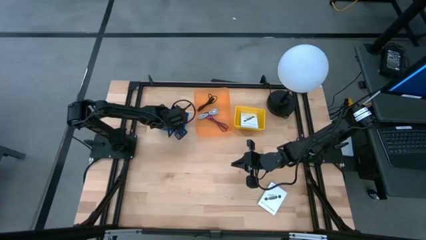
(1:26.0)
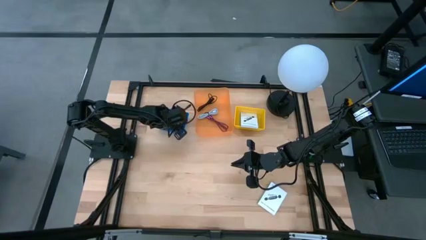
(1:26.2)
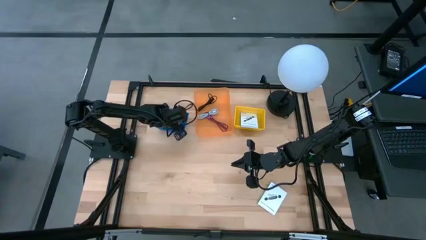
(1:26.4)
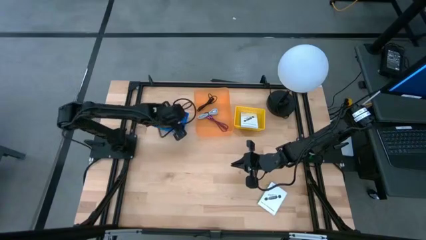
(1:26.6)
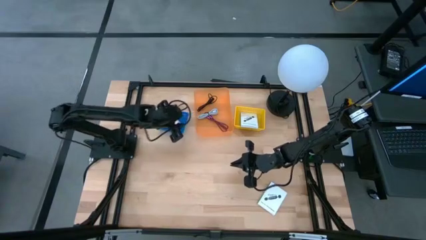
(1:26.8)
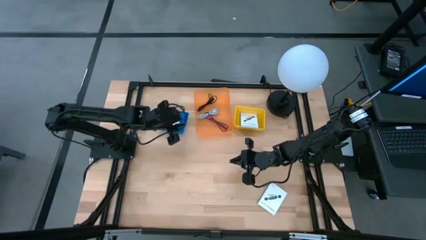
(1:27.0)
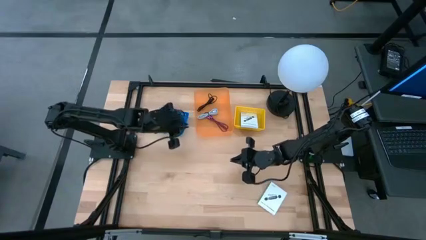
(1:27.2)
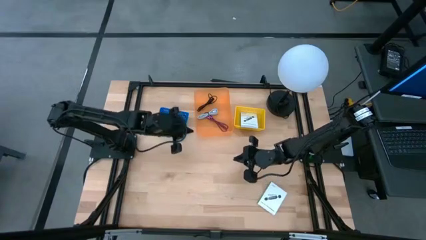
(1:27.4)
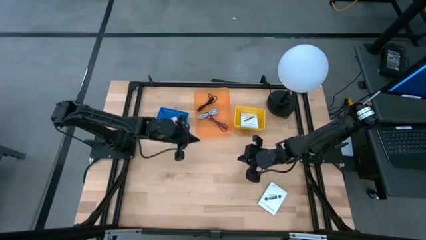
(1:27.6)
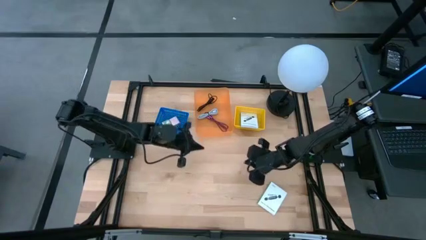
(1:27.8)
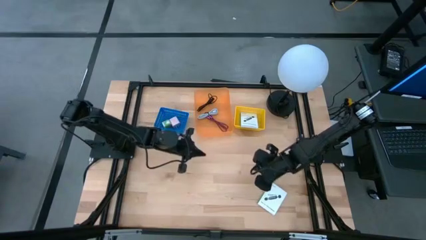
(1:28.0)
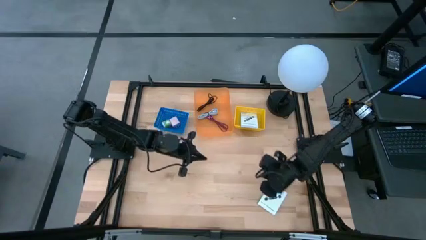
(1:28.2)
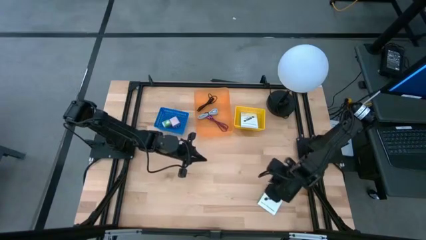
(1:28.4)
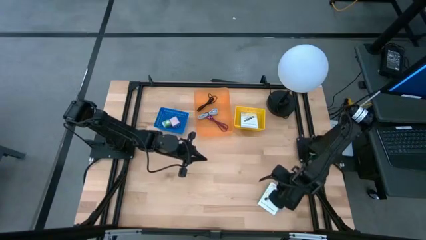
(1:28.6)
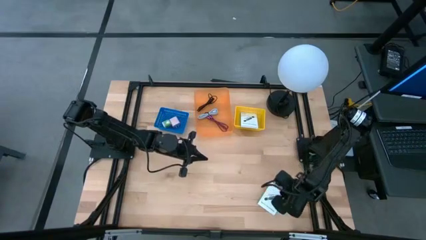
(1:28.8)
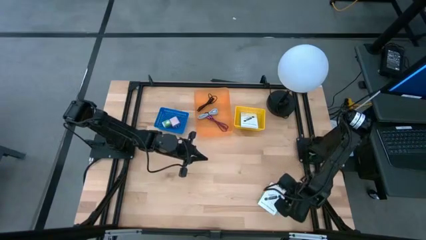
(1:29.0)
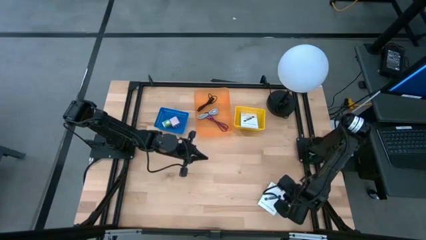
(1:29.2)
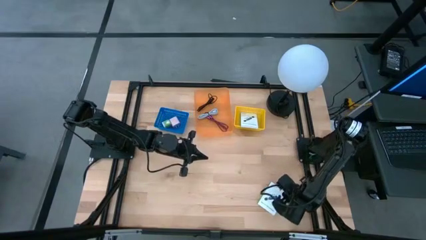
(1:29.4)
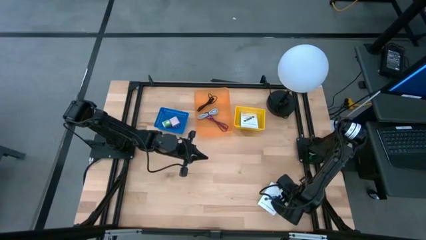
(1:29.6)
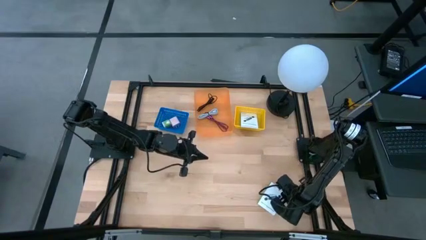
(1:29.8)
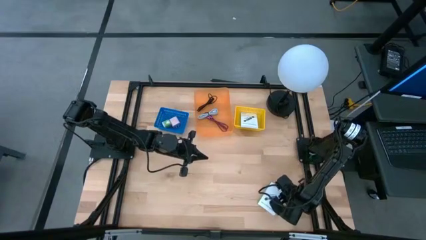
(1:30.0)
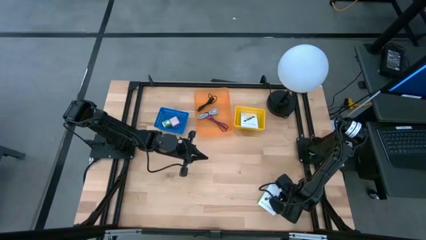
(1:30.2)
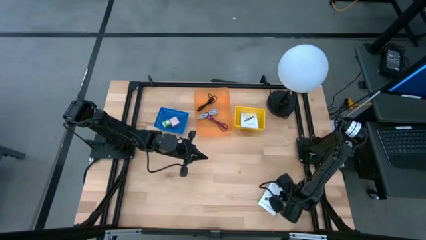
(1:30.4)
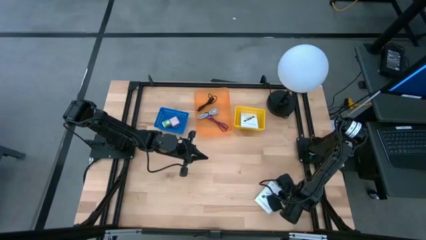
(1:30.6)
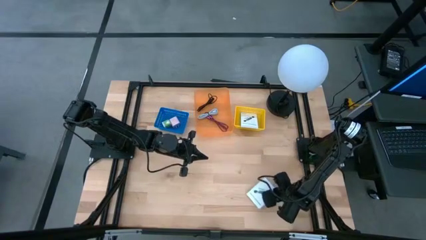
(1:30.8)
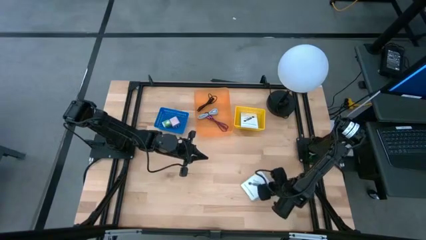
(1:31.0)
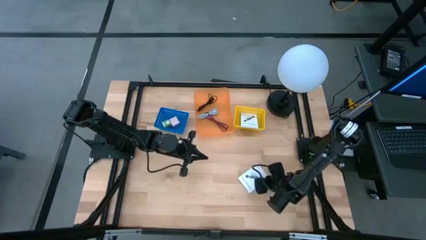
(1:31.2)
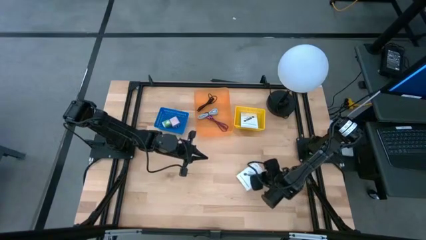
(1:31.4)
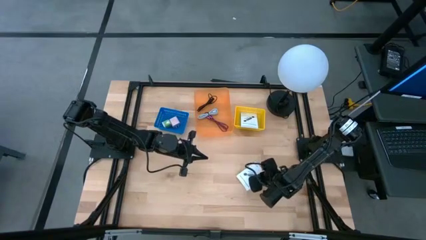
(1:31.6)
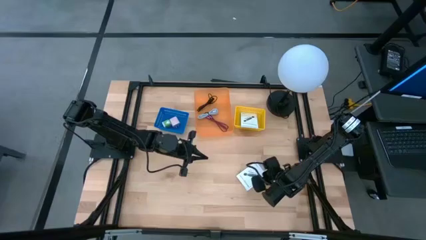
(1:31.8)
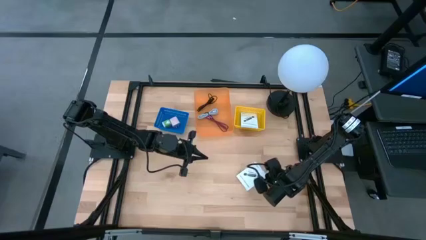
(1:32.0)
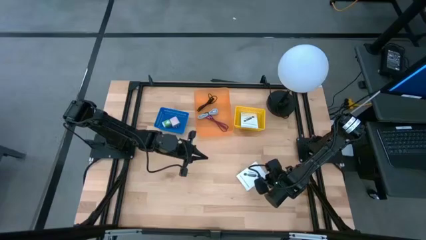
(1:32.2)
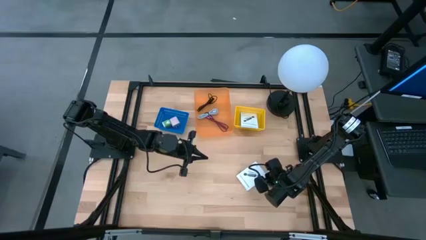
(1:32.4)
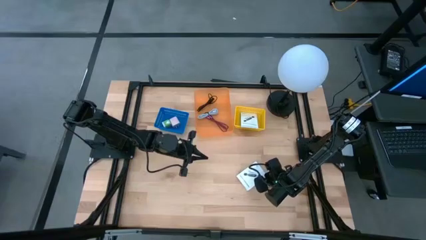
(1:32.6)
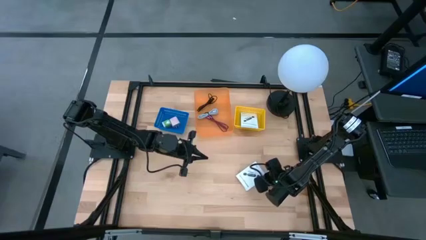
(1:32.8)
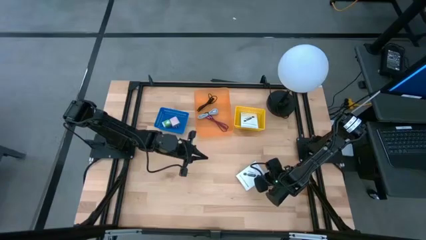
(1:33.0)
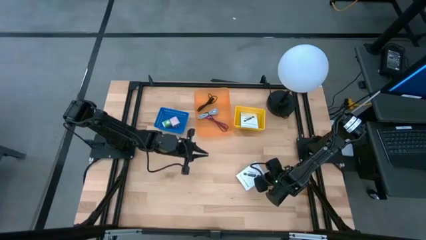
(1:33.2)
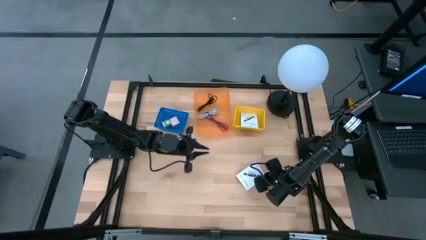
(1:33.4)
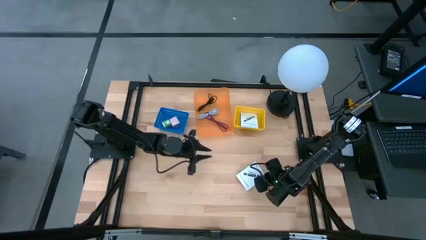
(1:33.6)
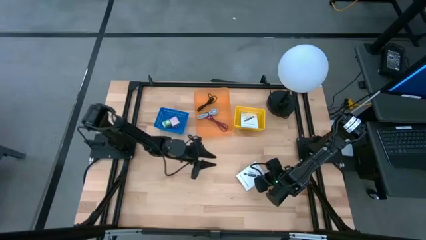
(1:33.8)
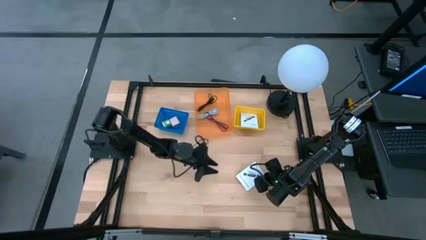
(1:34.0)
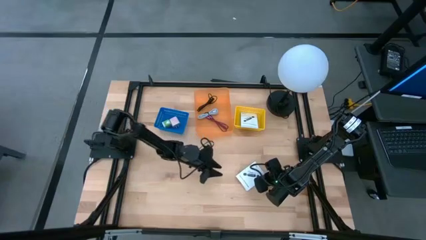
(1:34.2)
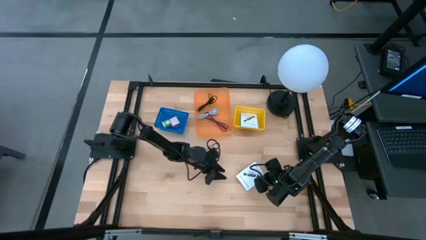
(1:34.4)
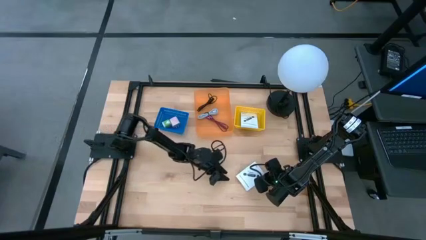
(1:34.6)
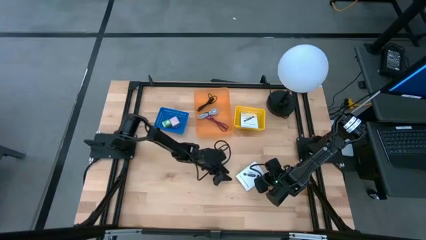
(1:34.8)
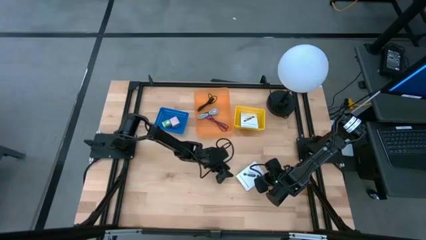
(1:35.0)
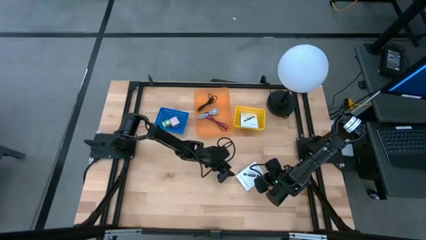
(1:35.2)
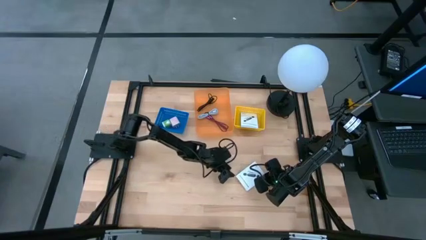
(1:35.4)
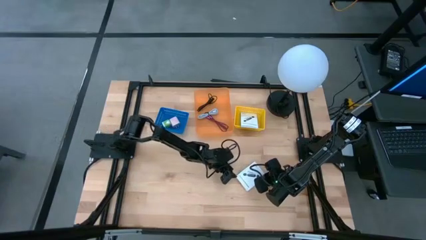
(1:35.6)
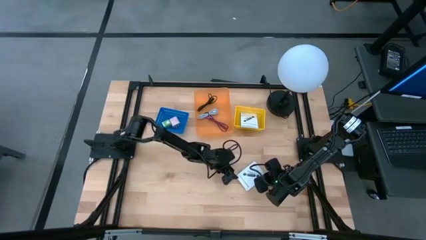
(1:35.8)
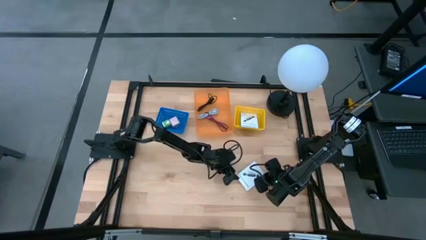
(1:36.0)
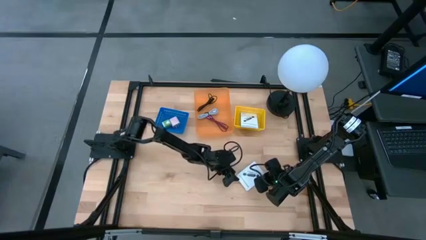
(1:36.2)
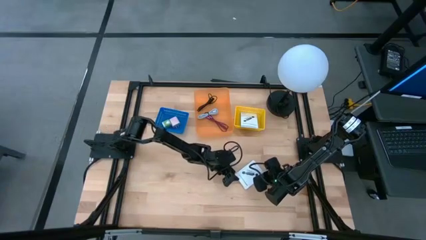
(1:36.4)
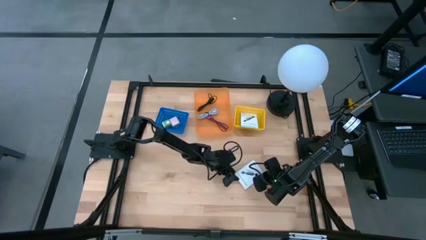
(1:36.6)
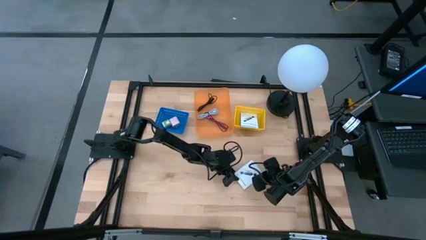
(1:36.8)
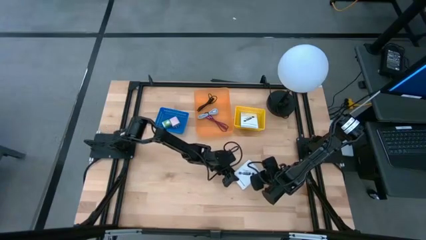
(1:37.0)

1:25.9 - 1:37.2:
Task: Pick and place items into bin
Put the white USB box into the yellow bin
